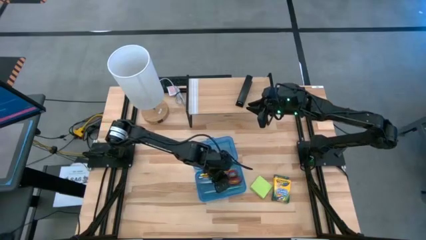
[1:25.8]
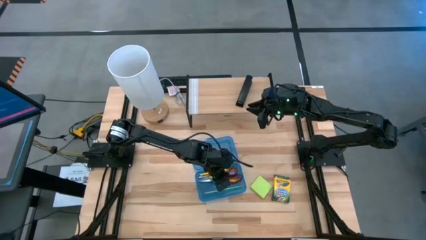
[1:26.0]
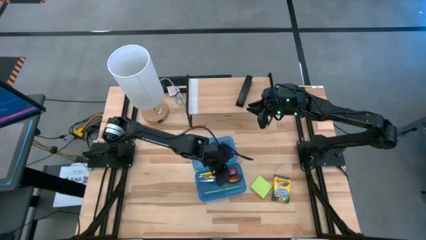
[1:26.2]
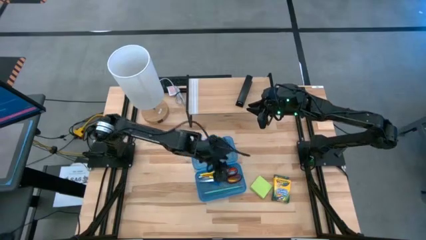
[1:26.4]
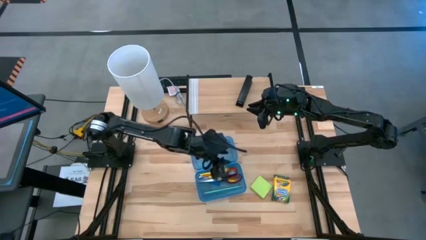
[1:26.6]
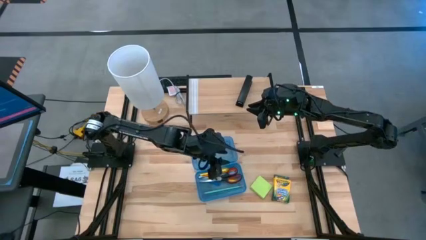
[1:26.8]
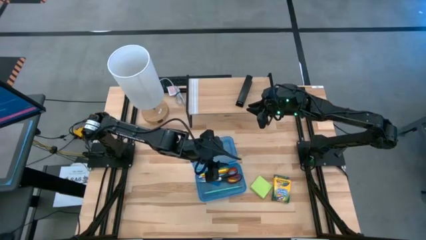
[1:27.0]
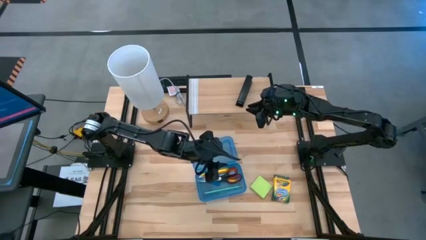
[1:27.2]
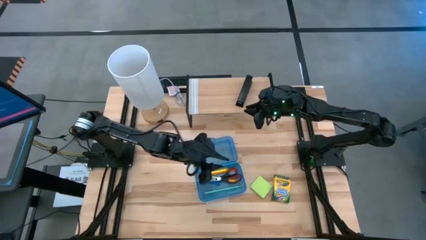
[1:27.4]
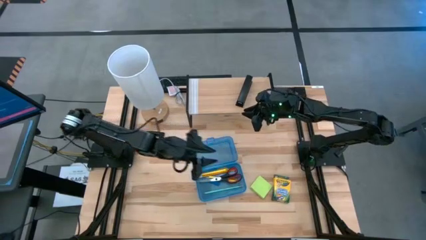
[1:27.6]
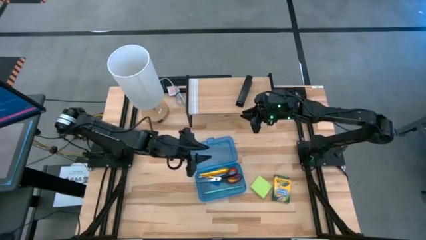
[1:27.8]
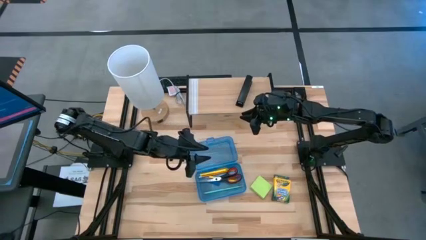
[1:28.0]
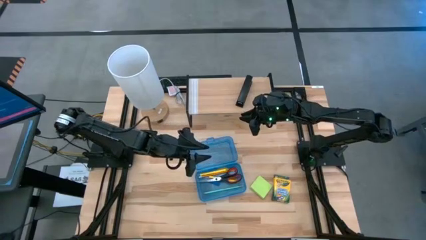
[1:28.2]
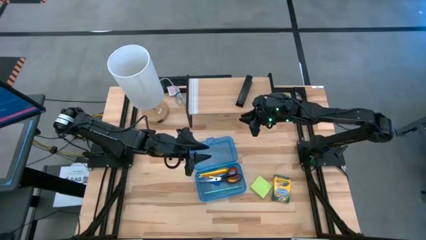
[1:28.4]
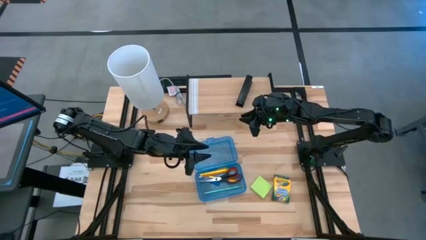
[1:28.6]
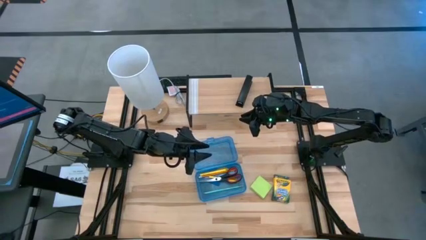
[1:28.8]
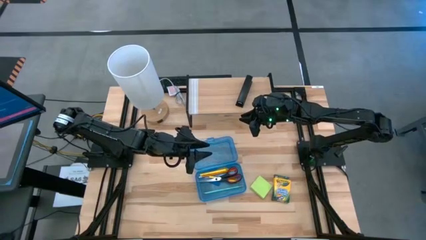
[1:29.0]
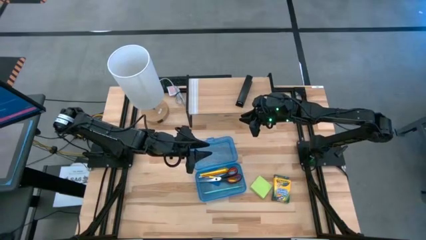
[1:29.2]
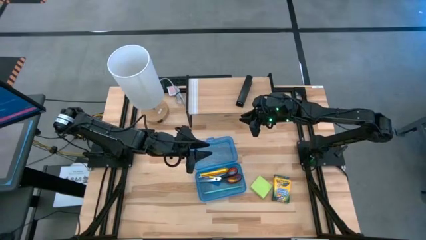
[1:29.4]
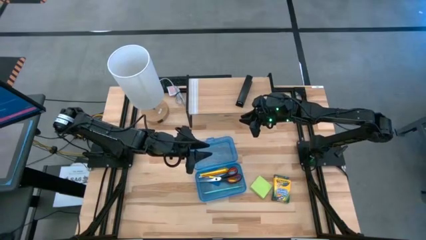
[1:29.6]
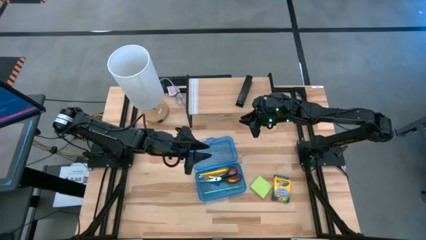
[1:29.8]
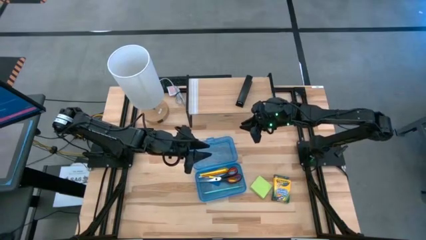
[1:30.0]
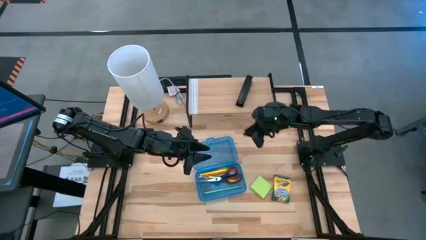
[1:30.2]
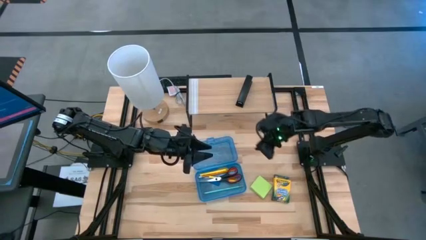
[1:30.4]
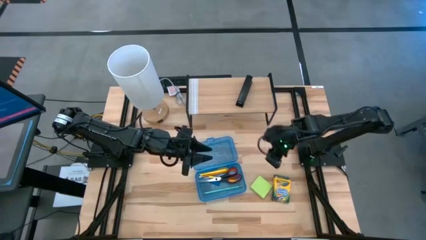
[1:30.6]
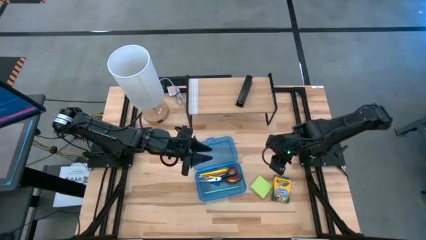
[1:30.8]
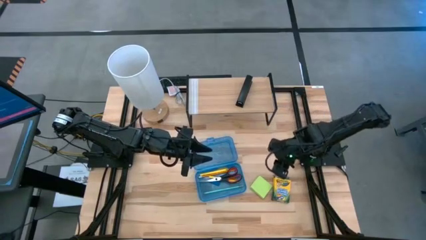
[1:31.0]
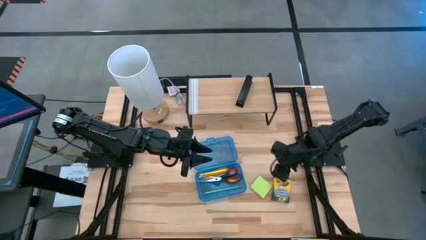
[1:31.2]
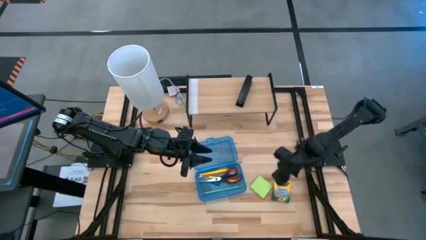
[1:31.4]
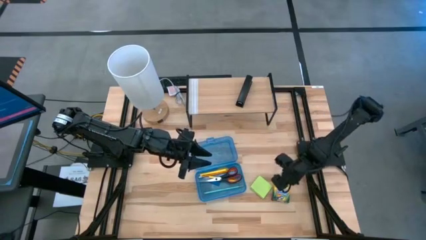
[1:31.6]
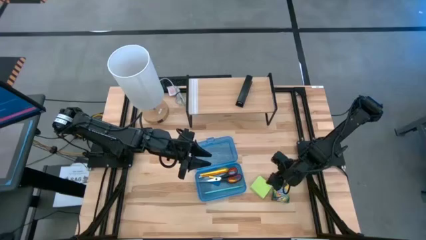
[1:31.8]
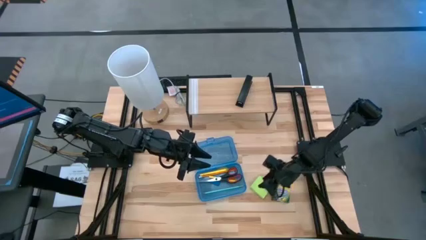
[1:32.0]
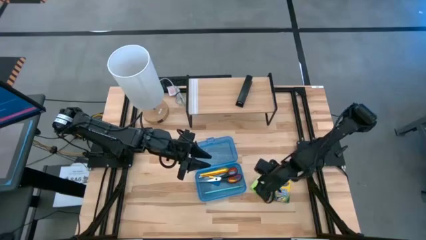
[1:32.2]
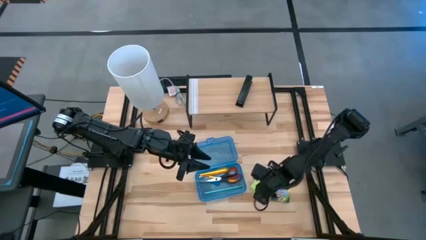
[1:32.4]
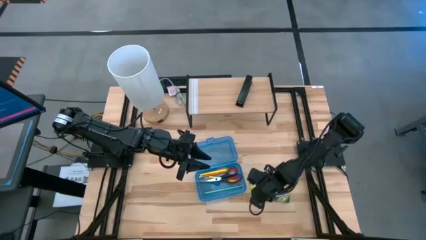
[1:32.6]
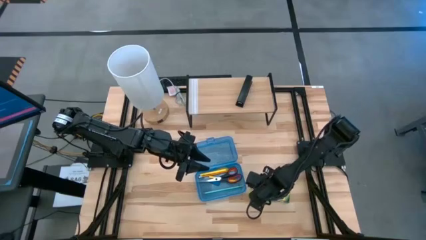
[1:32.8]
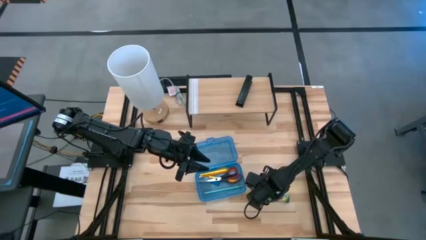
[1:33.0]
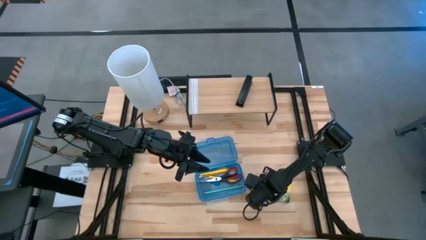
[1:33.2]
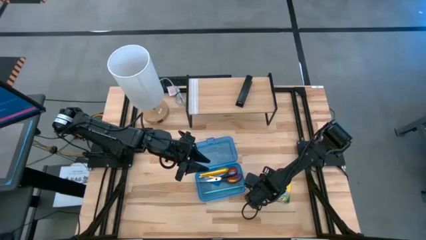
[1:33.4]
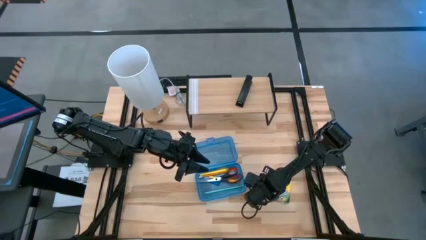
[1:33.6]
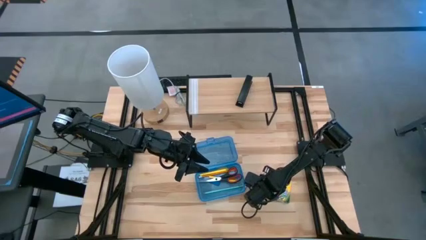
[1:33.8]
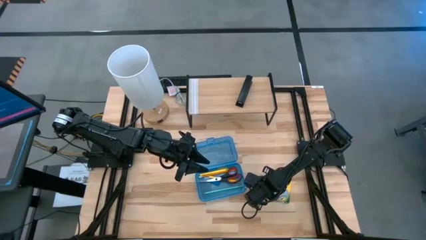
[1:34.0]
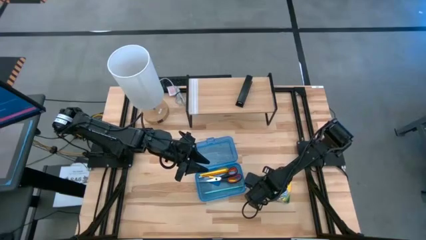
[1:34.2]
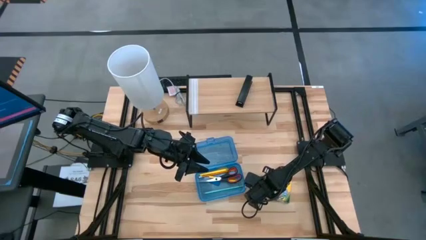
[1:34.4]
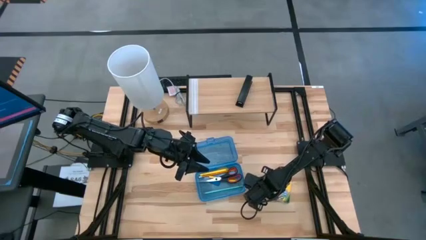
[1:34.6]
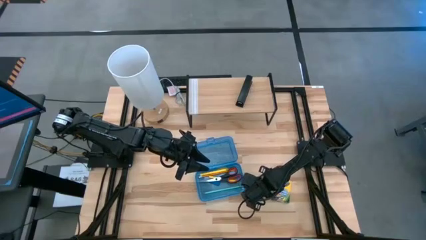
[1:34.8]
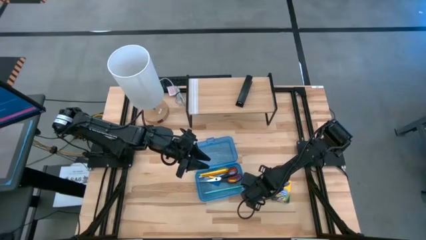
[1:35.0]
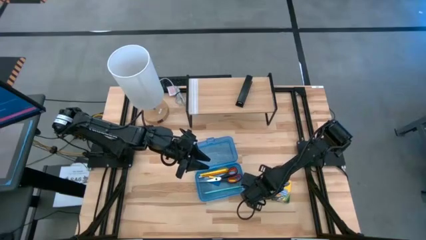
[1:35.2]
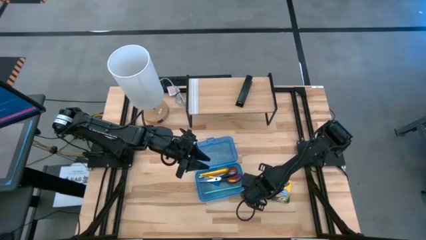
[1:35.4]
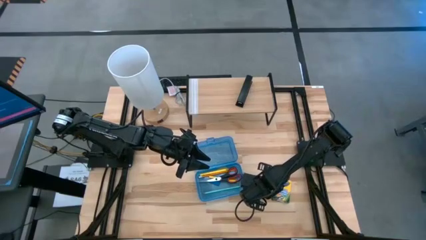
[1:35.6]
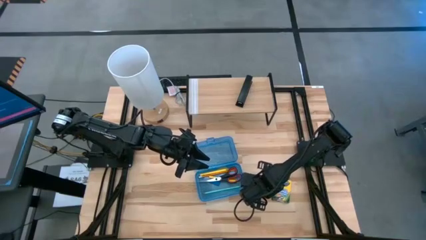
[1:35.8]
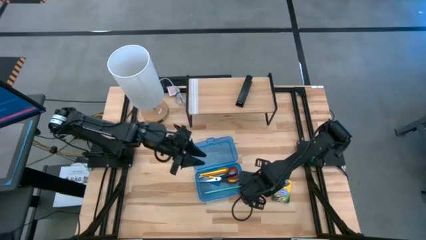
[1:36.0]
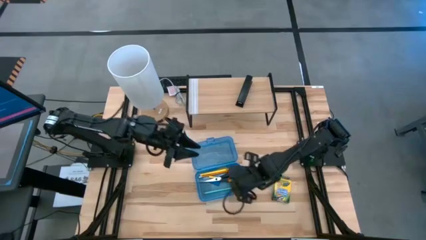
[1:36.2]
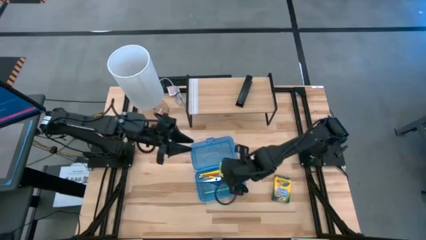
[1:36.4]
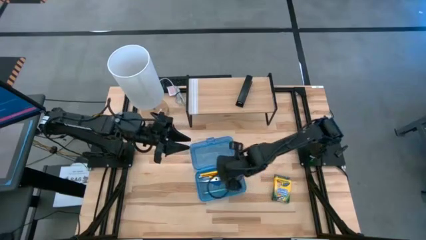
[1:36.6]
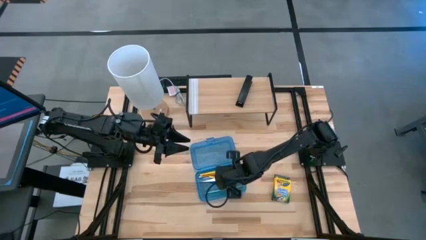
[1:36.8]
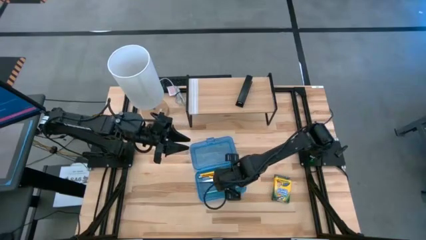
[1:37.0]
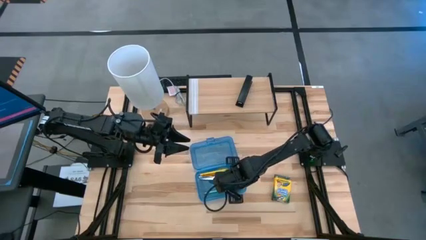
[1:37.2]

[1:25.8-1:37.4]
Task: Pack school essentials
Put the green sticky notes into the blue supply box

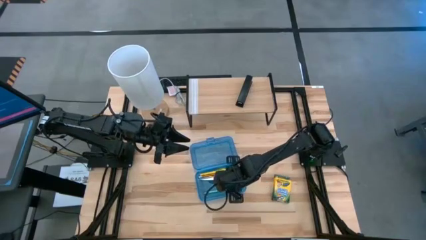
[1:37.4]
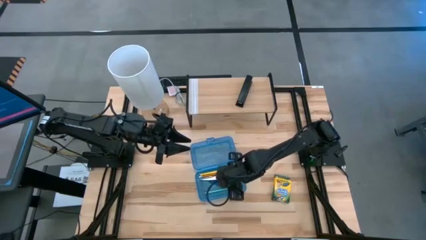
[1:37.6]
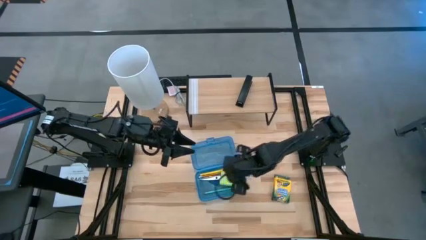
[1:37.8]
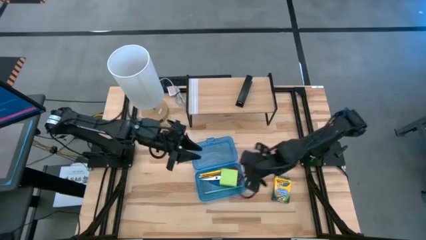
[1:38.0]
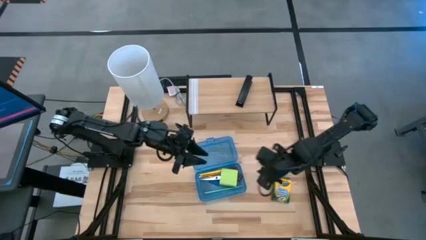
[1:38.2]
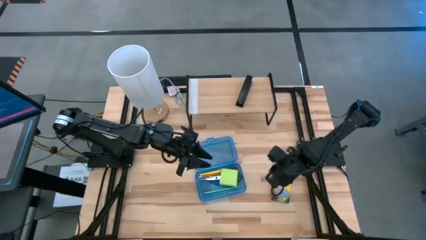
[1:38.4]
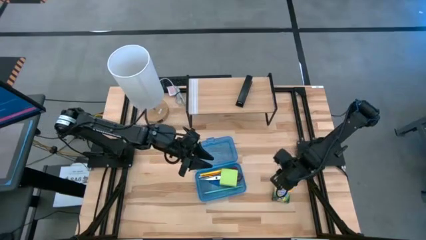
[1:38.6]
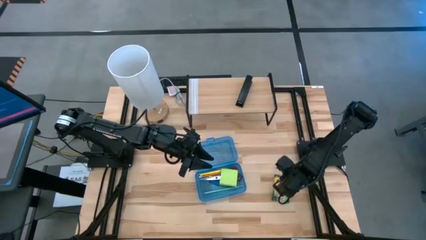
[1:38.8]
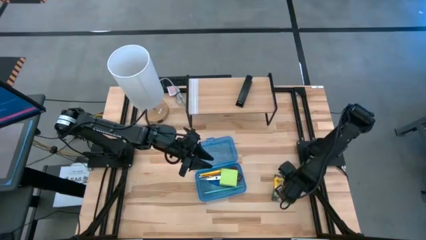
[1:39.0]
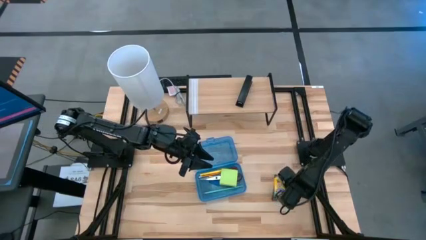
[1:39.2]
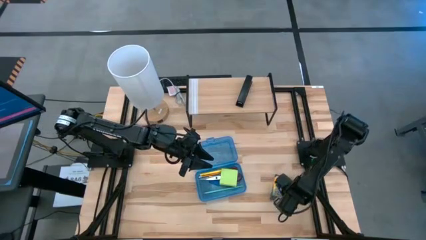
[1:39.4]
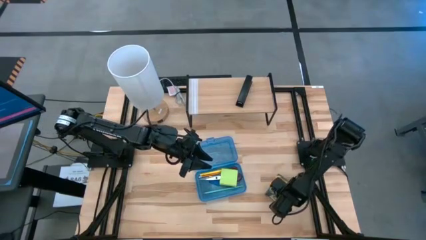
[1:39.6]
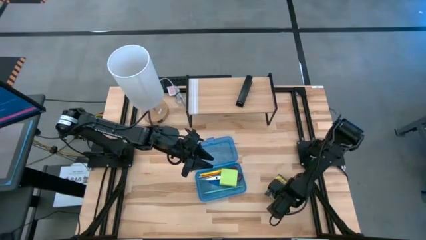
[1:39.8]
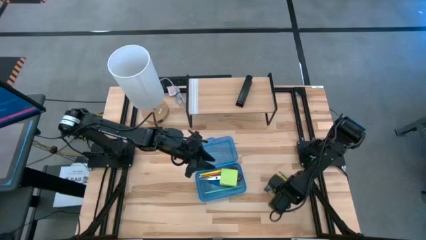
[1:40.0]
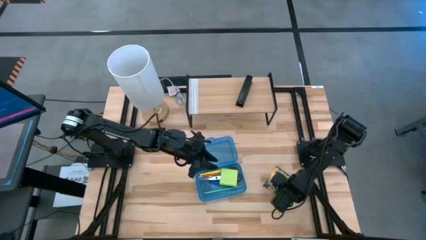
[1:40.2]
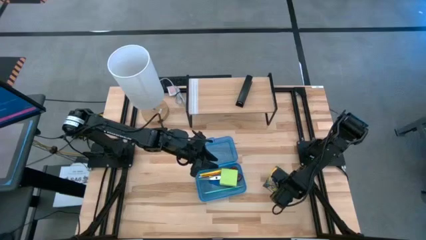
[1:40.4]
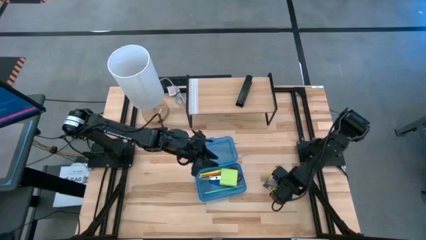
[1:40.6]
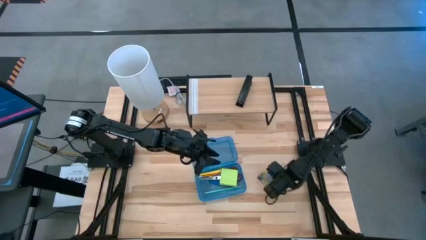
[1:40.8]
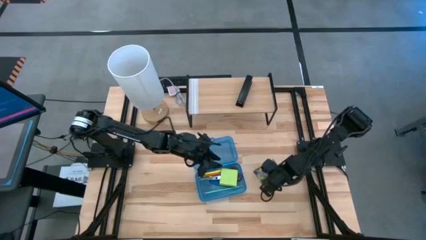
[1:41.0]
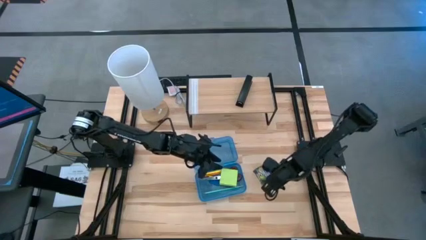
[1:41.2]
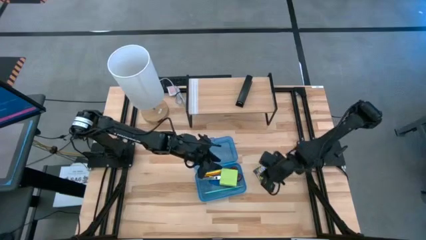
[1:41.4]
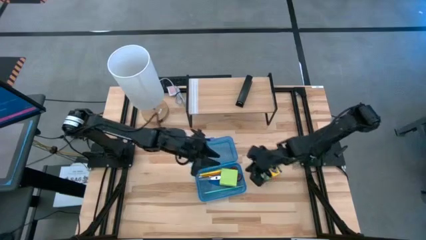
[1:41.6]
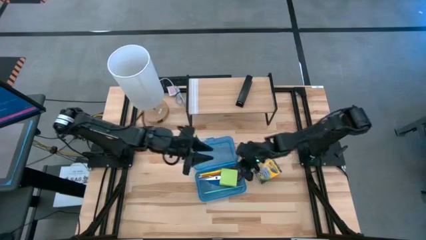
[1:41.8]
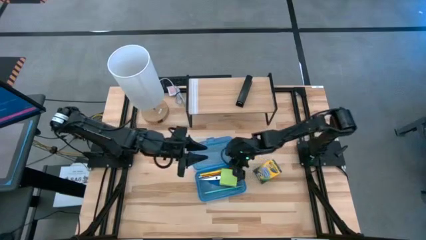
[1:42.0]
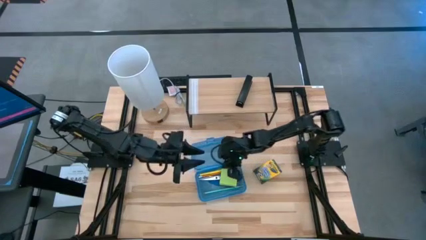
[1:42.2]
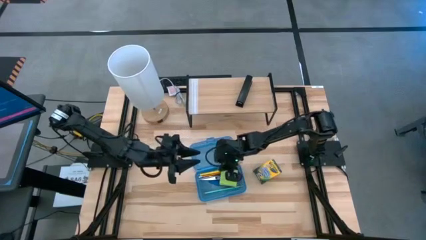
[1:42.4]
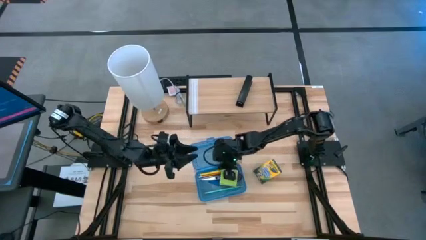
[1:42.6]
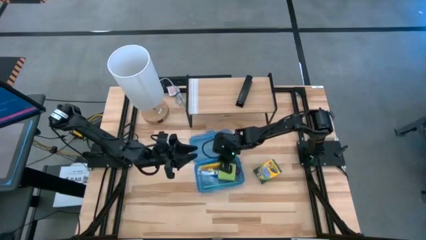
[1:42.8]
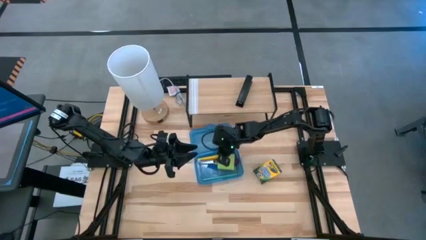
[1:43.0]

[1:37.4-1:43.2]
Adjust the blue supply box
